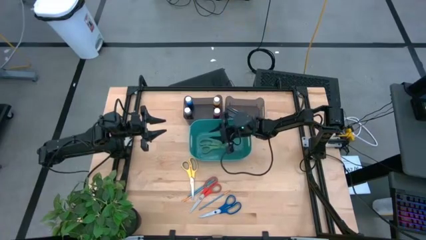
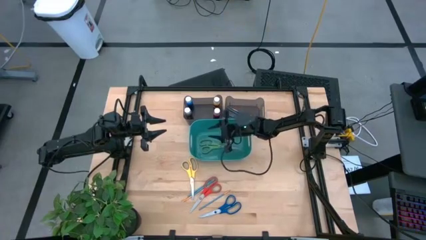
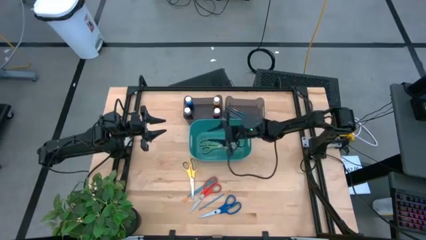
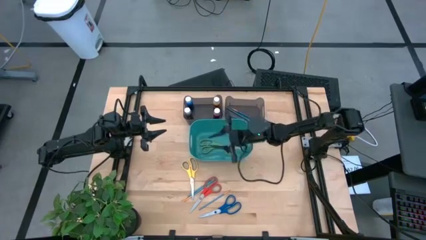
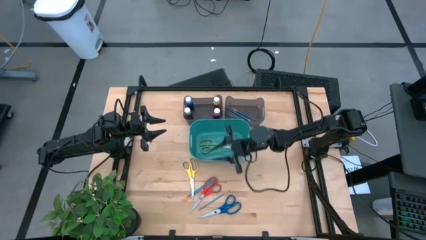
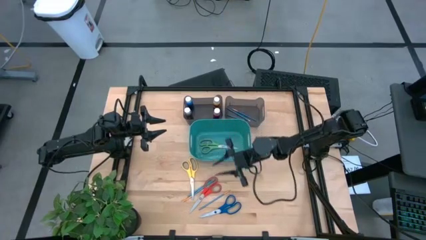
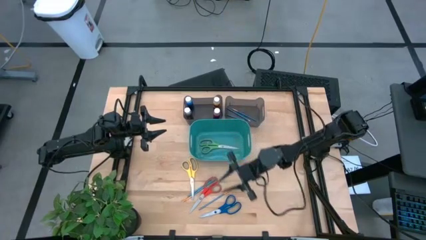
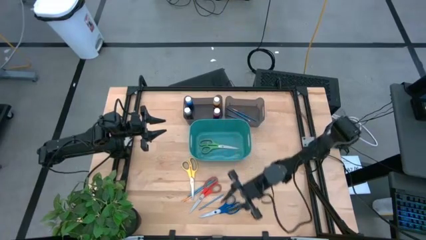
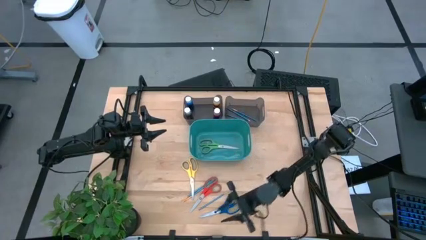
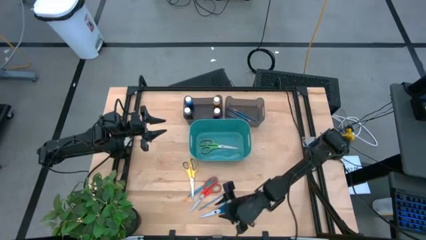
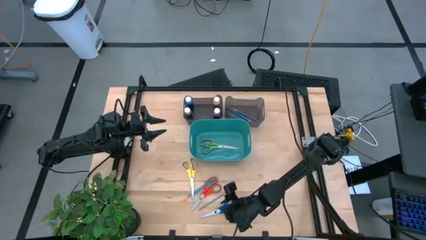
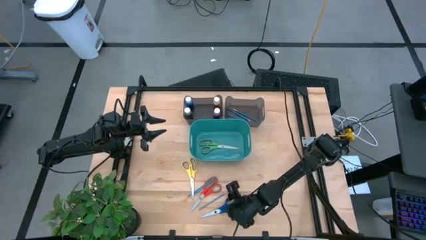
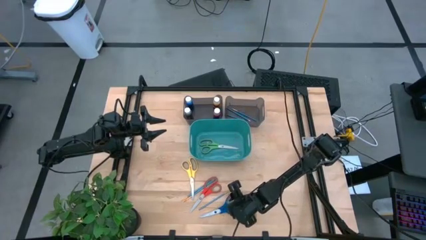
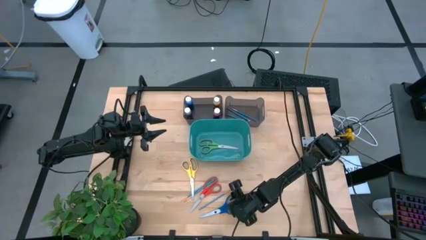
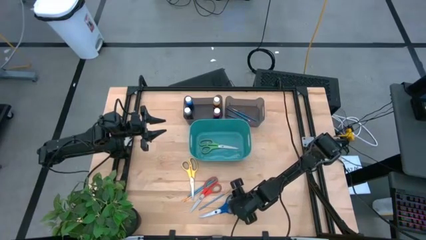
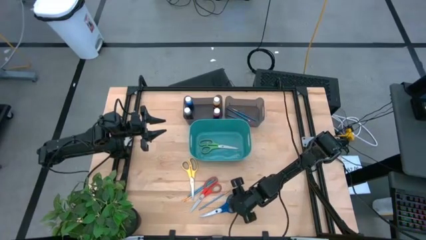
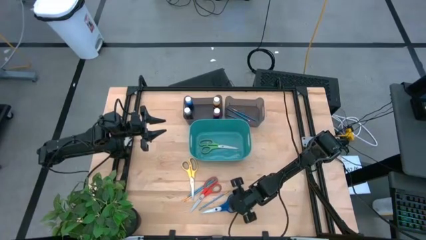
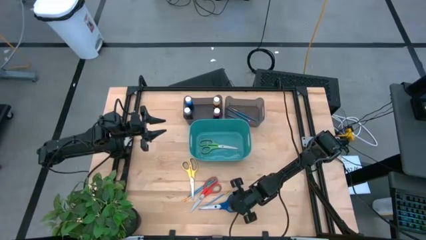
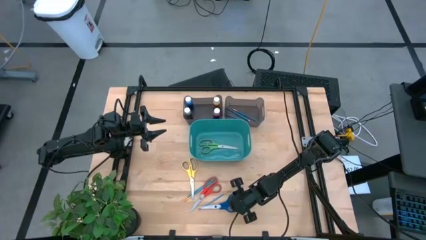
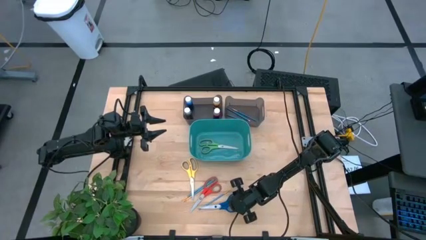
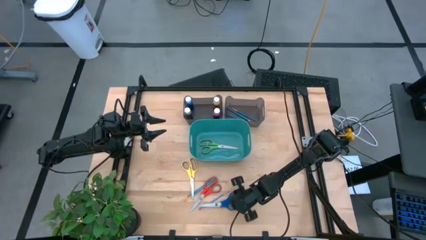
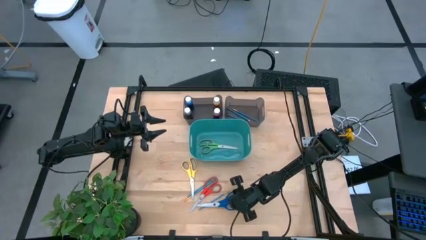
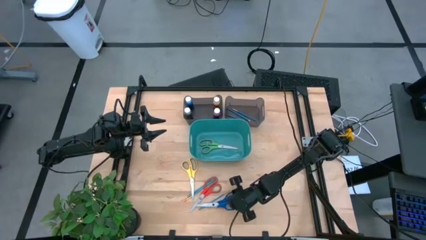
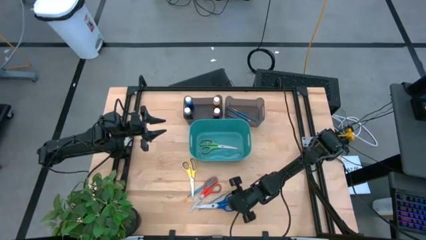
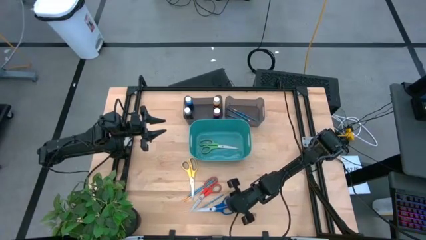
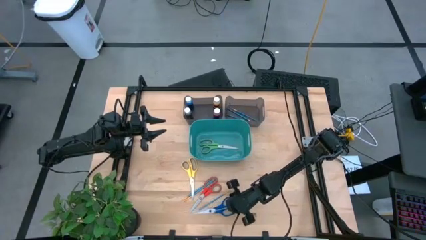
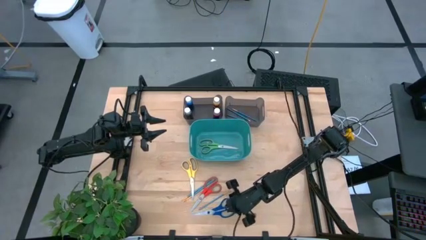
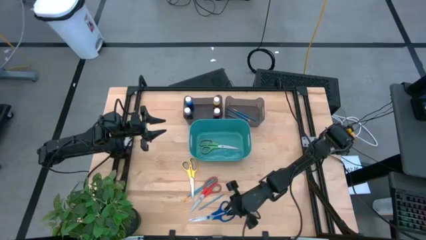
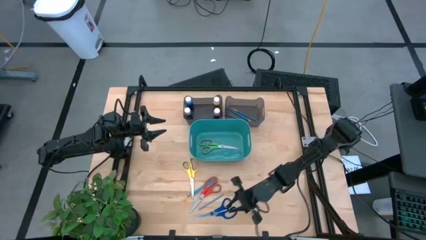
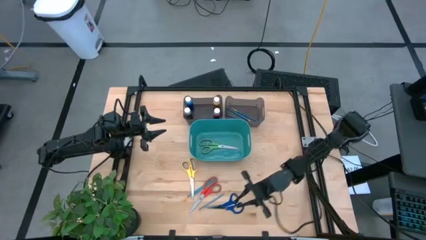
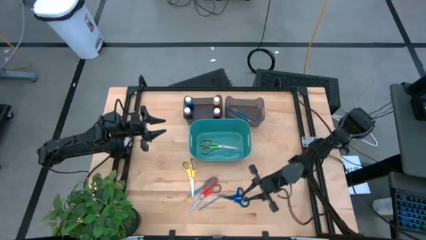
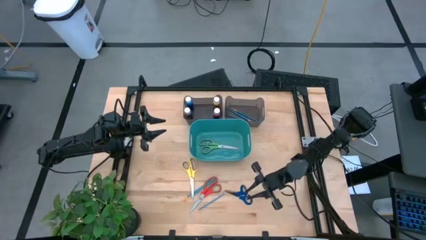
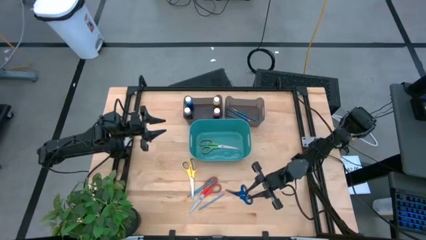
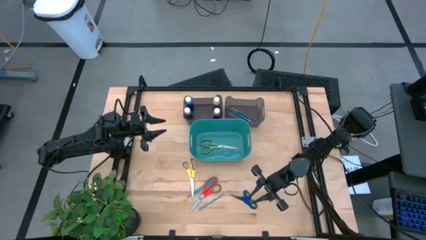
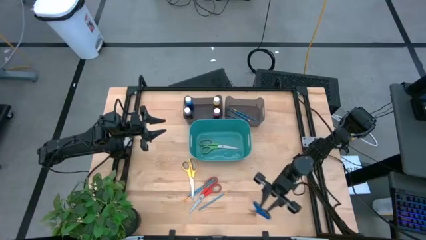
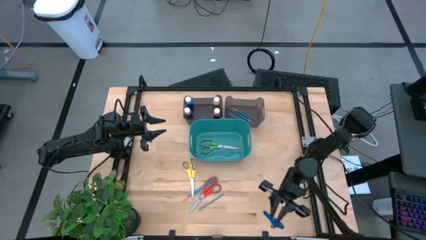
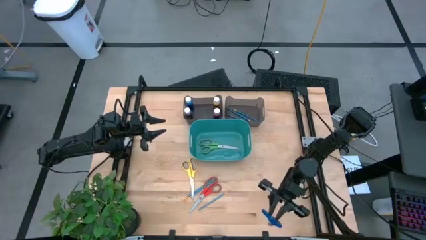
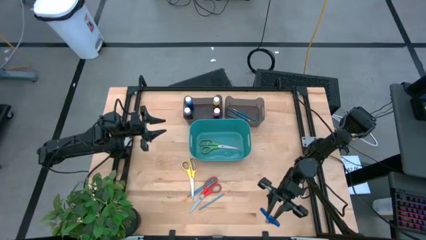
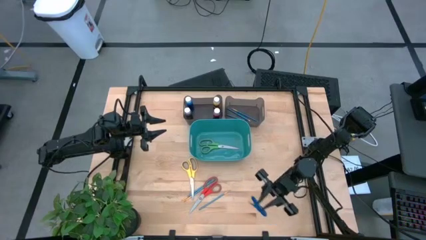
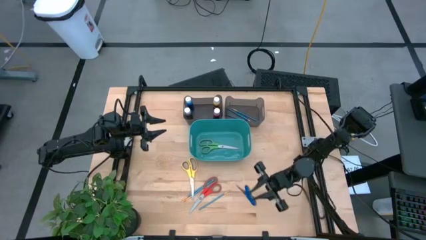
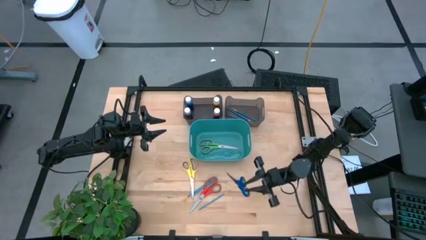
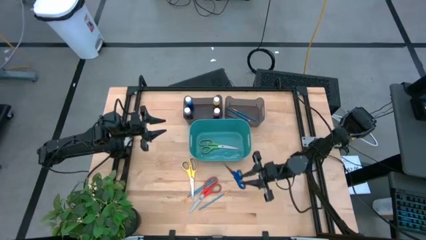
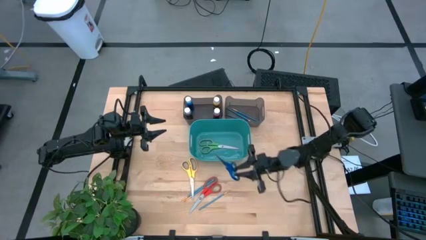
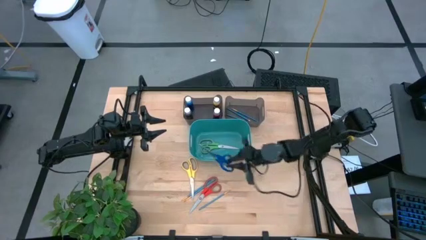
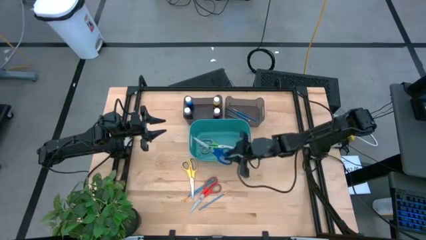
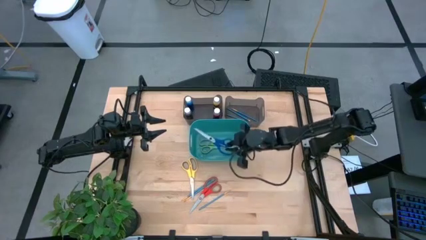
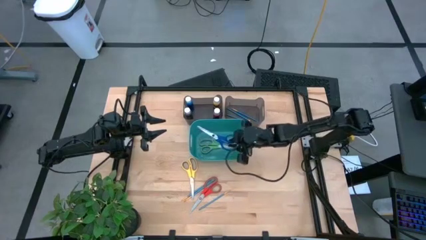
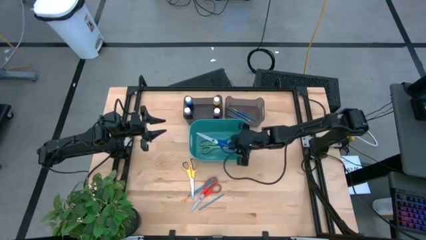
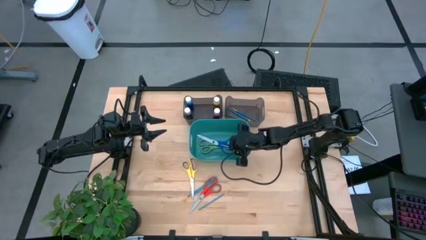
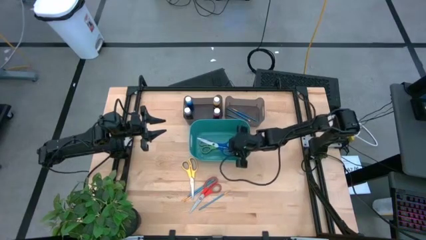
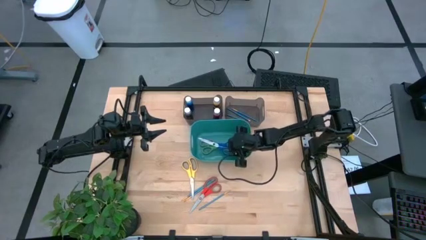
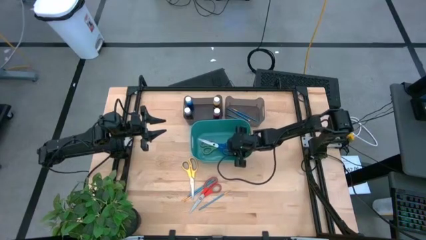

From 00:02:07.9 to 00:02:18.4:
Task: Pick & Place Paint Supplies
Put the blue scissors into the green bin

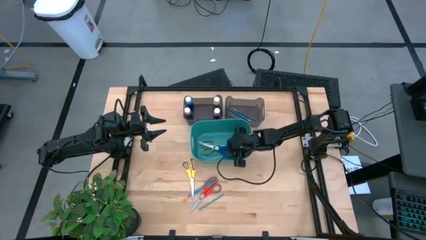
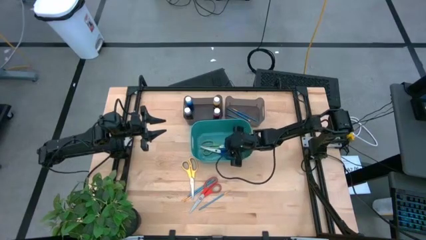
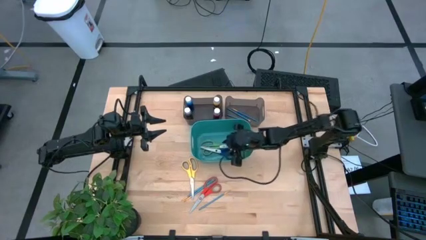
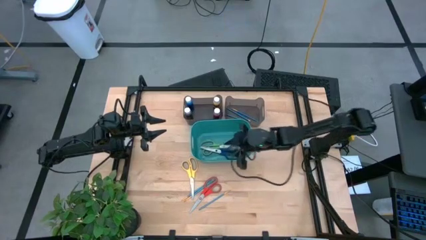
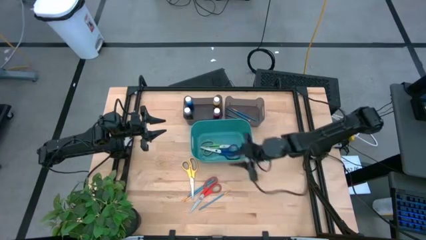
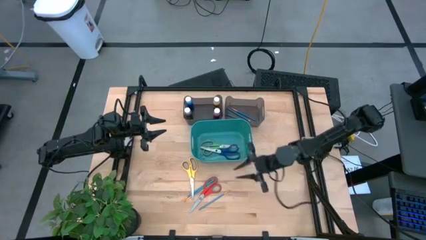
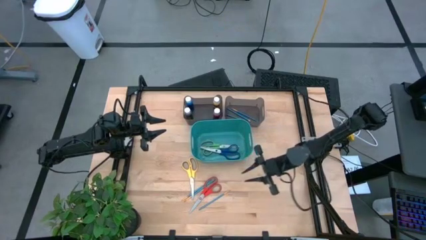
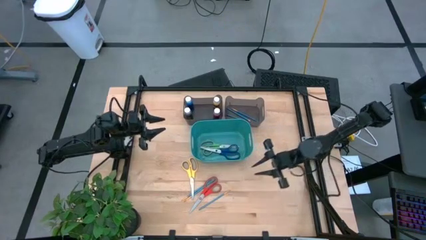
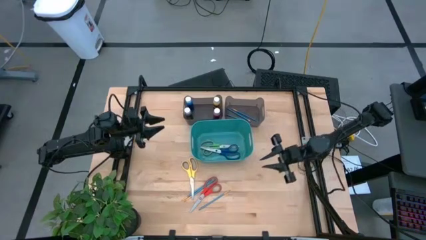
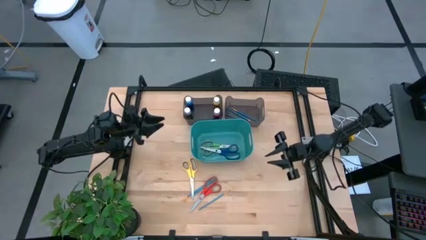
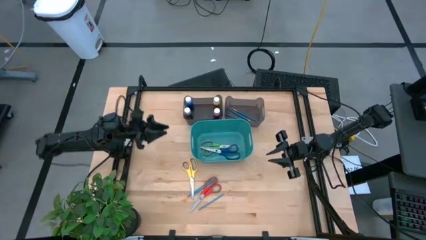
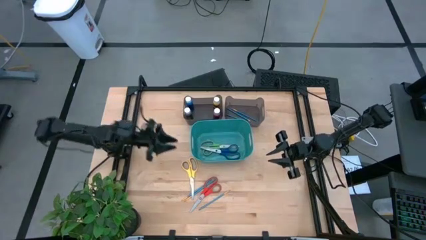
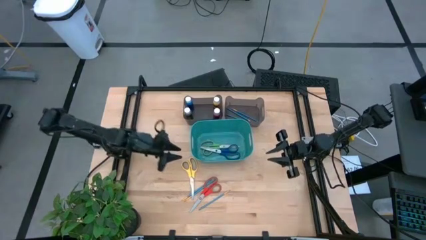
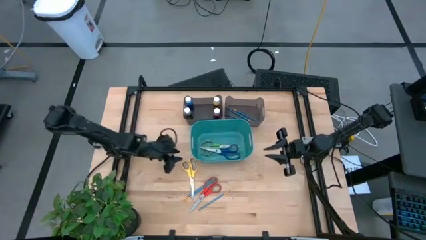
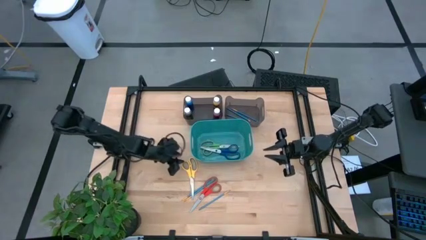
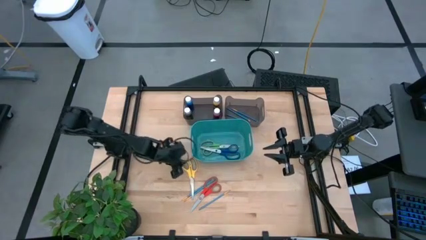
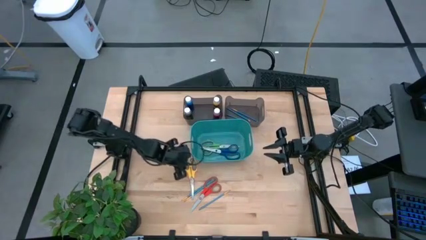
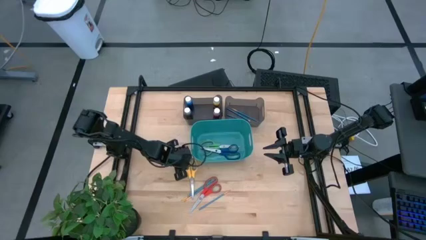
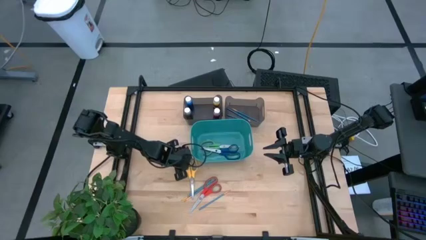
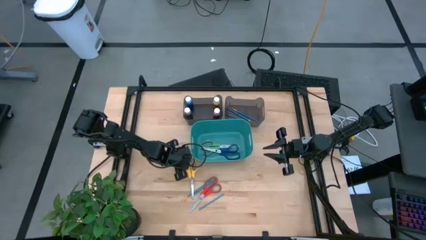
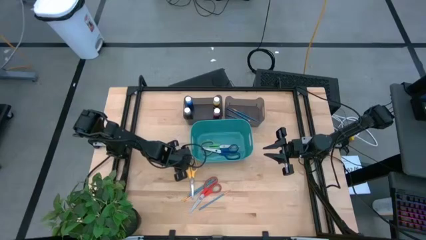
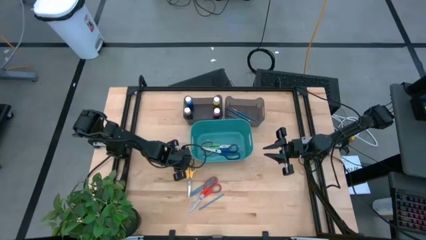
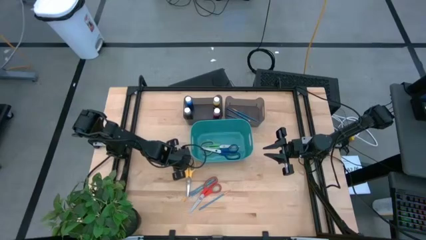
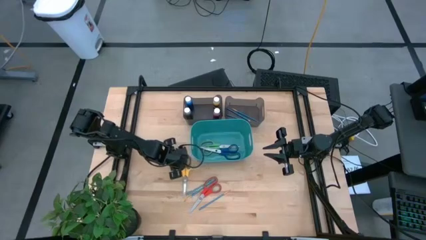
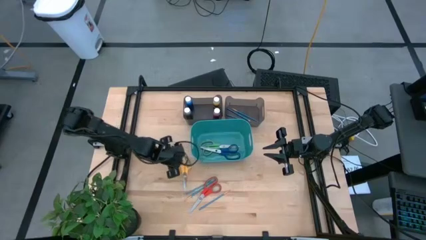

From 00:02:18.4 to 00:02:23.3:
Put the yellow scissors into the green bin
